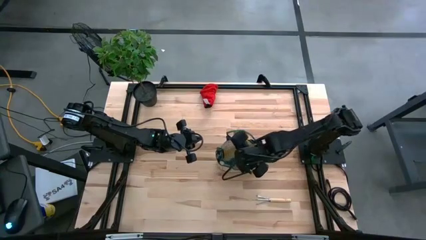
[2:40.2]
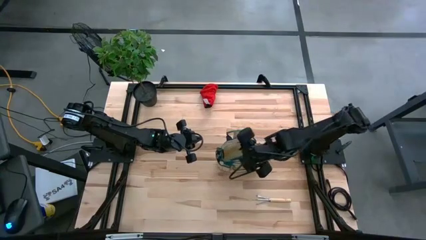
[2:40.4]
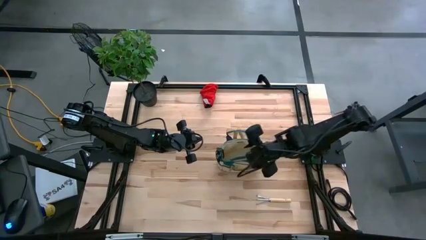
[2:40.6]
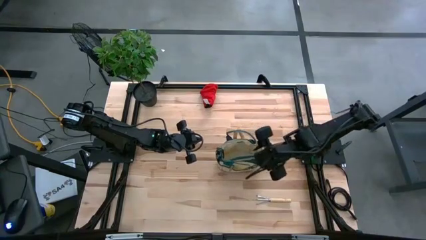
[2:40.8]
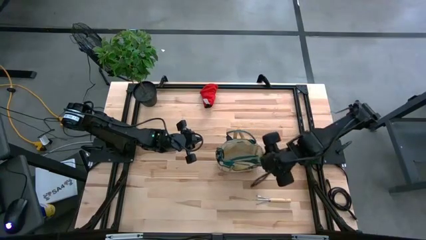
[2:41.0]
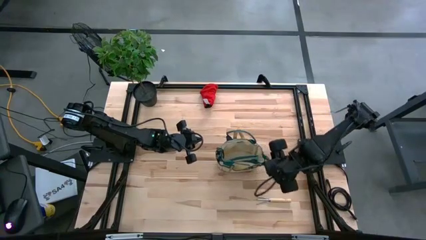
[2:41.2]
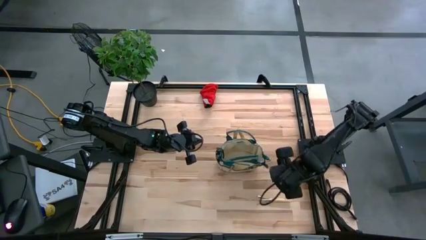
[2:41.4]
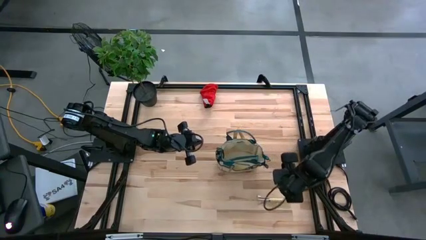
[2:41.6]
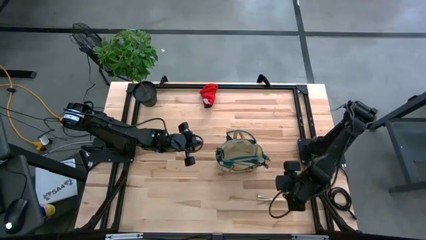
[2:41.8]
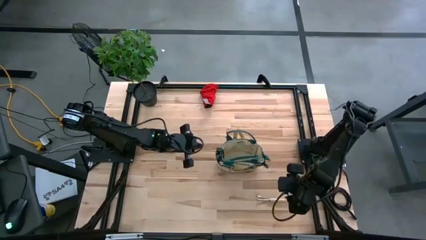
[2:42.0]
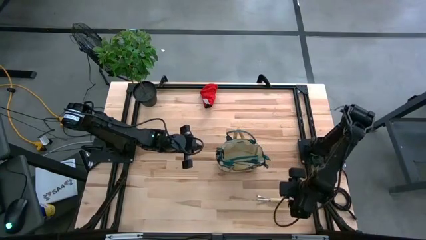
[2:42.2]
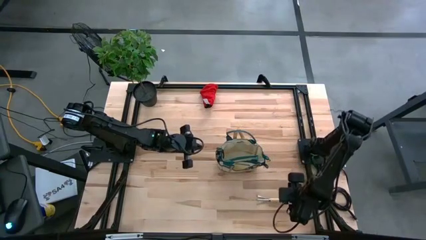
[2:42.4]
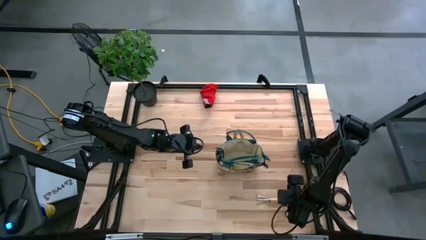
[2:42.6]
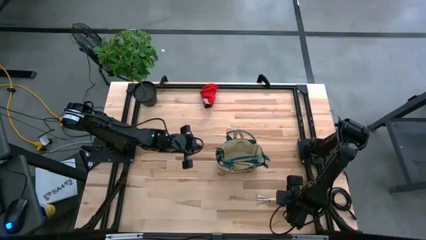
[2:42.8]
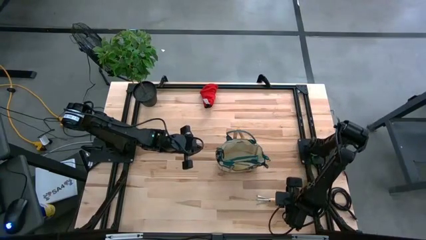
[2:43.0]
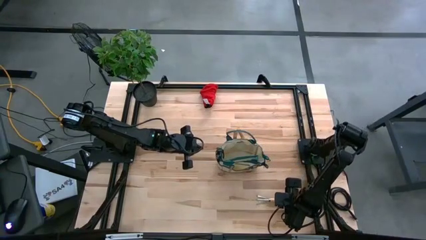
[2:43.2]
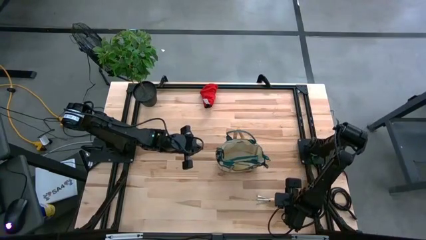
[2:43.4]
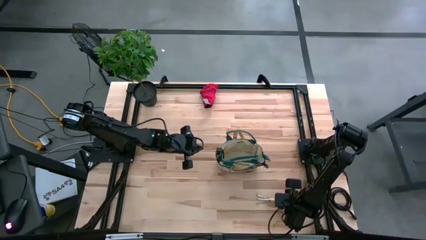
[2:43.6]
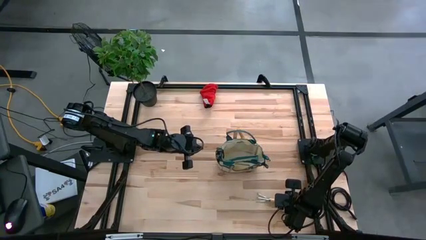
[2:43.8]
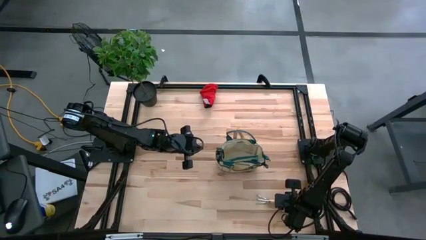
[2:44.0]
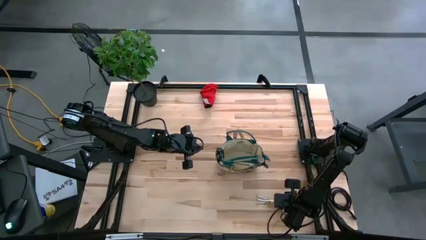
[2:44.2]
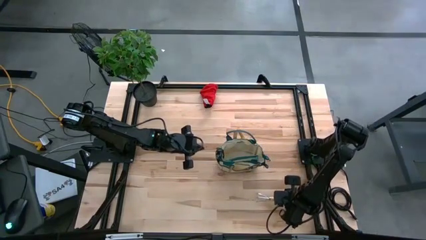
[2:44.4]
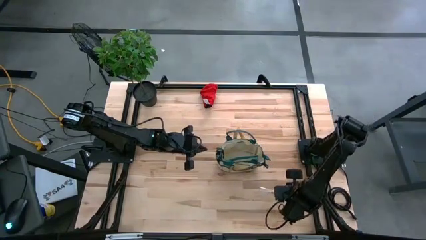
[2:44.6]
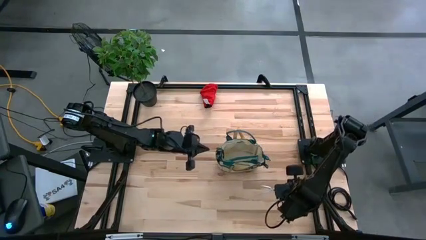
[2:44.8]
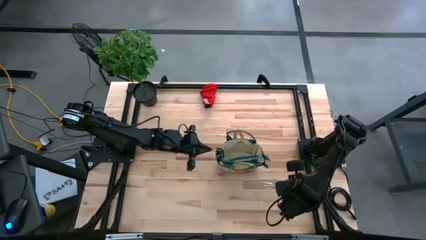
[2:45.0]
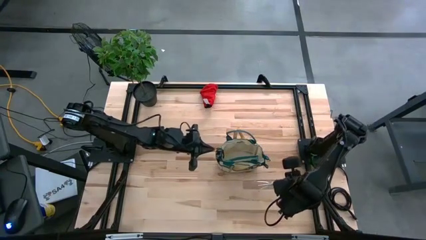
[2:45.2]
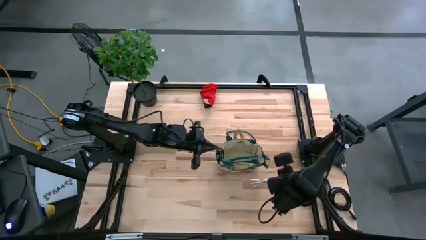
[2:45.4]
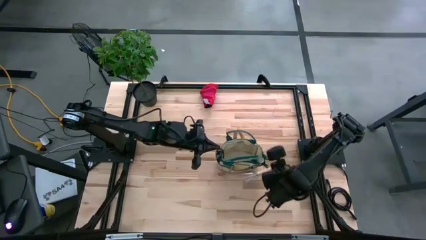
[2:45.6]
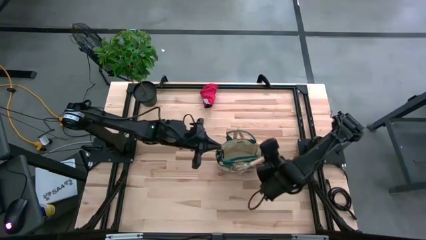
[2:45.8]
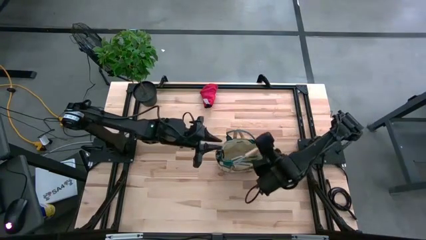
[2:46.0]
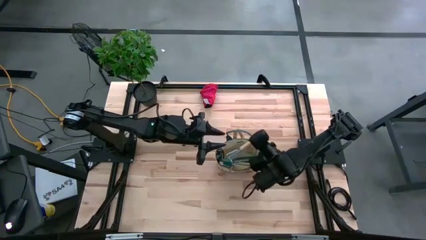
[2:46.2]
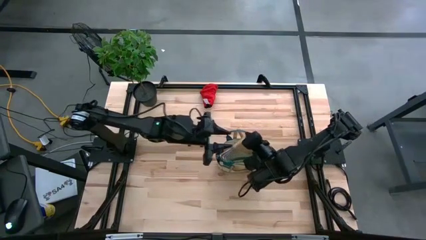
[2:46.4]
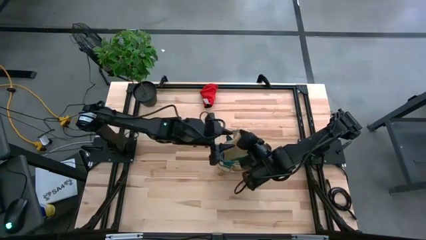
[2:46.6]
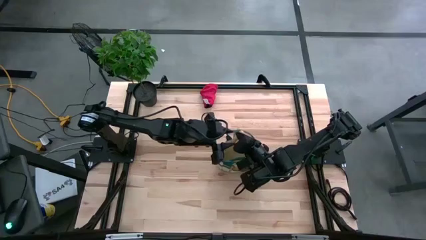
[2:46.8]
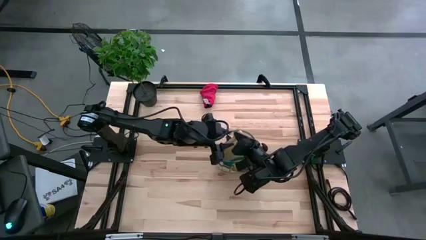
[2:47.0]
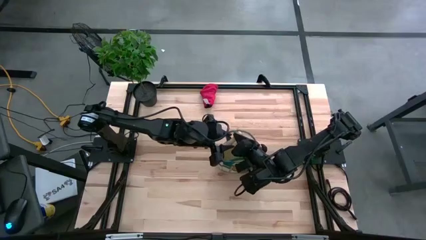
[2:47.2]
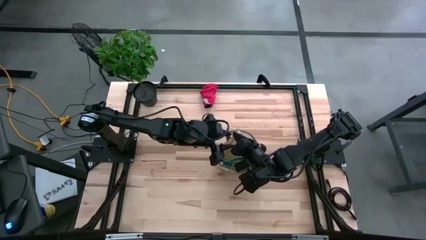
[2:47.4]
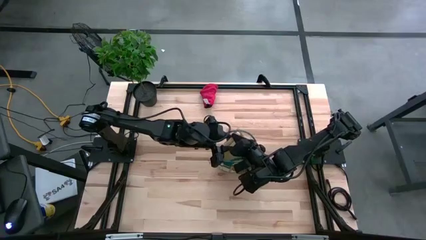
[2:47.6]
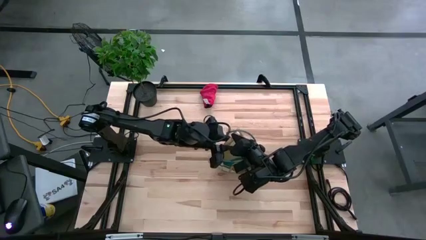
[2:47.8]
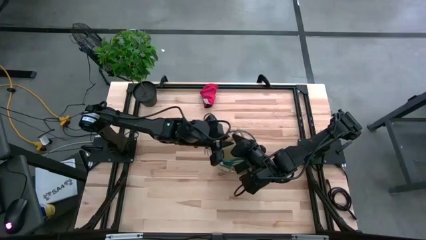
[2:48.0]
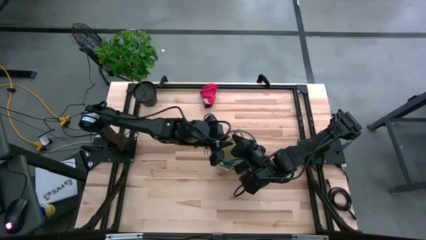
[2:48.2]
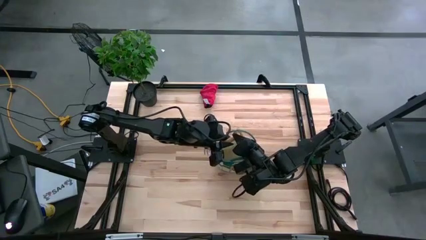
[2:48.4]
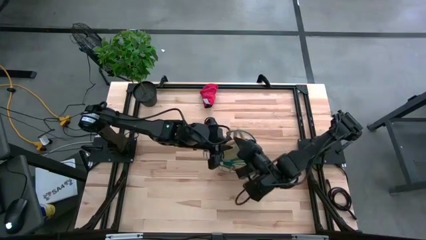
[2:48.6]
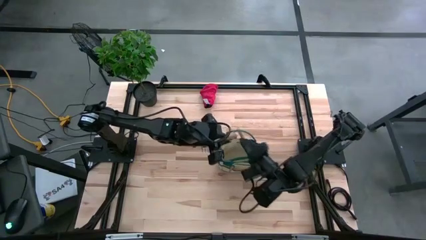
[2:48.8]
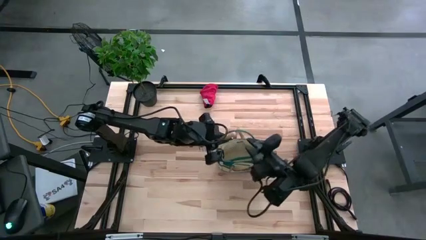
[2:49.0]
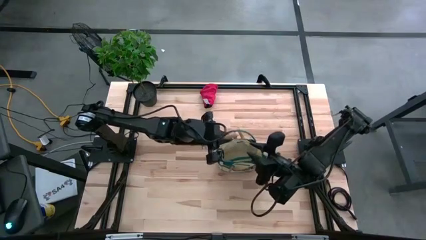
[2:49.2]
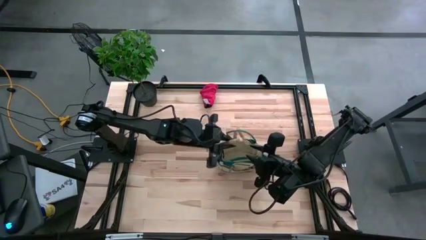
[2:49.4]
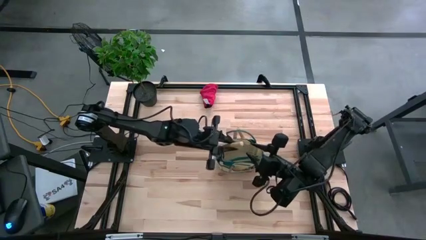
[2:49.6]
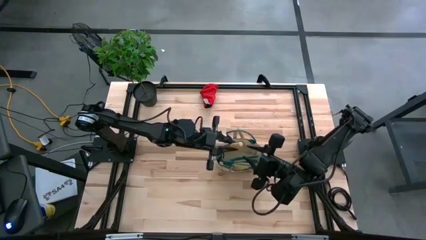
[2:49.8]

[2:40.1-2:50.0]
Task: Pick & Place Garden tools in Gardening bag
Put the hand rake into the gardening bag

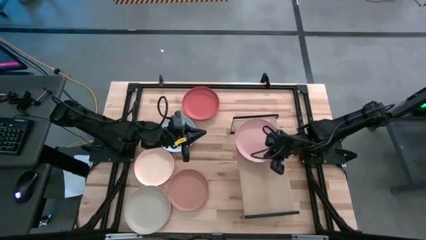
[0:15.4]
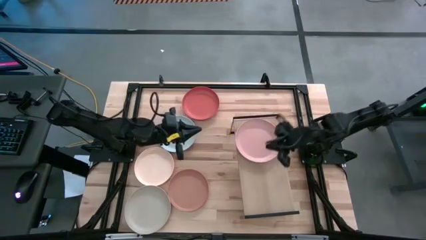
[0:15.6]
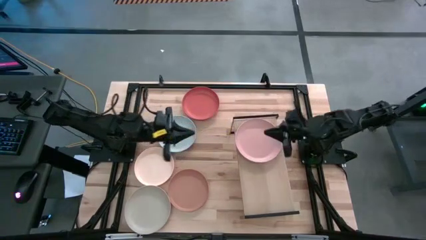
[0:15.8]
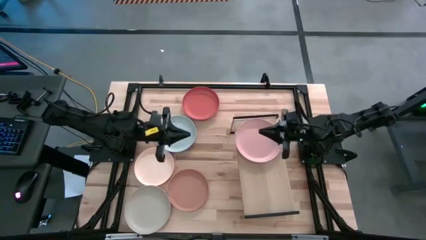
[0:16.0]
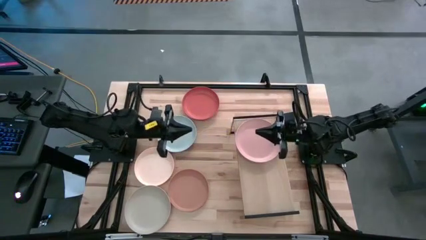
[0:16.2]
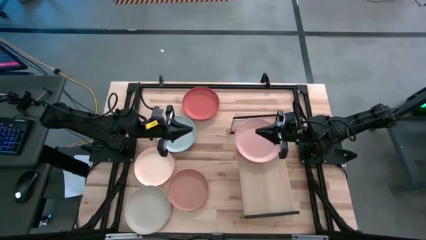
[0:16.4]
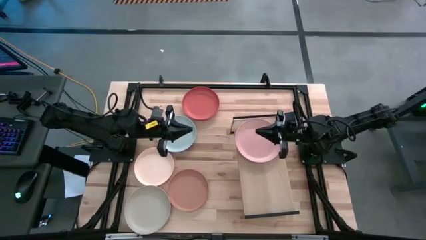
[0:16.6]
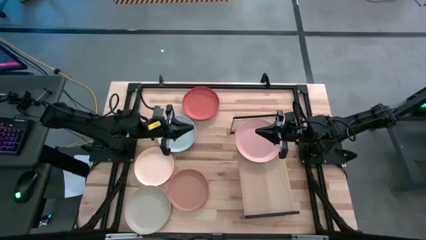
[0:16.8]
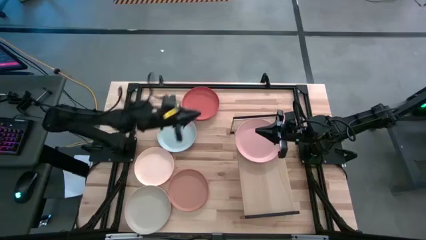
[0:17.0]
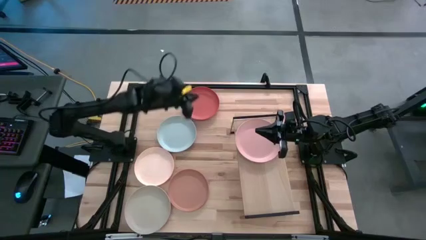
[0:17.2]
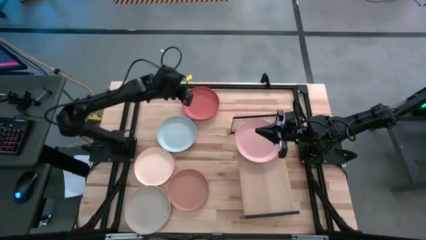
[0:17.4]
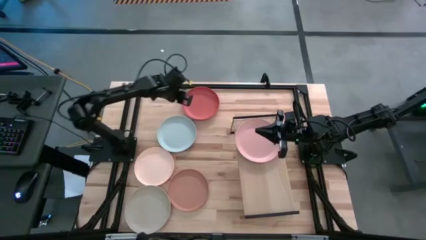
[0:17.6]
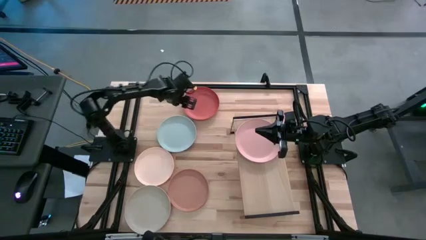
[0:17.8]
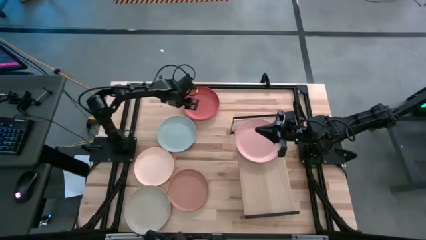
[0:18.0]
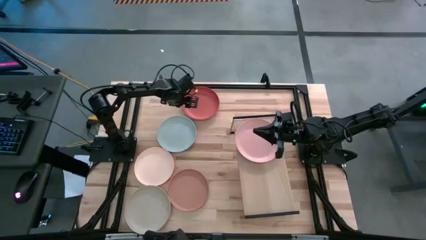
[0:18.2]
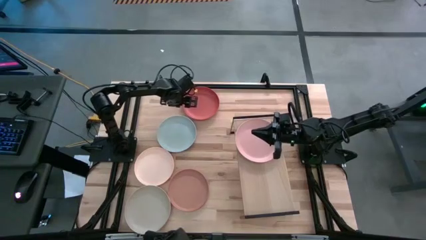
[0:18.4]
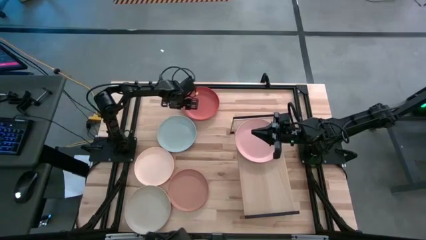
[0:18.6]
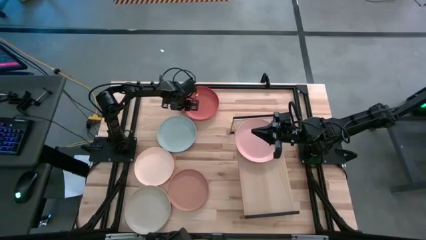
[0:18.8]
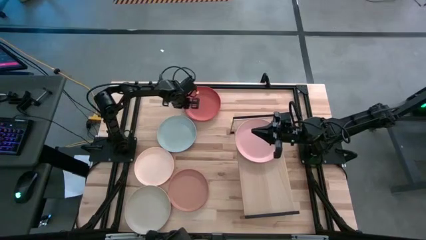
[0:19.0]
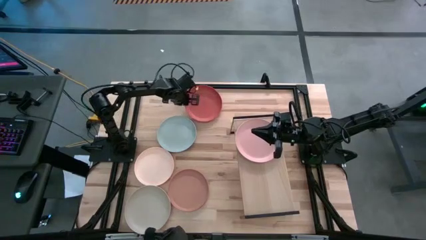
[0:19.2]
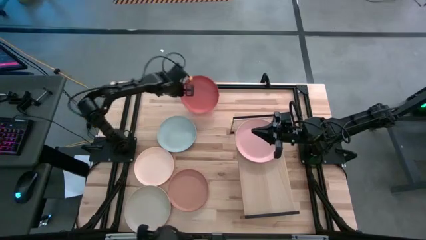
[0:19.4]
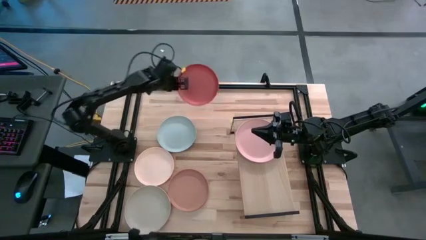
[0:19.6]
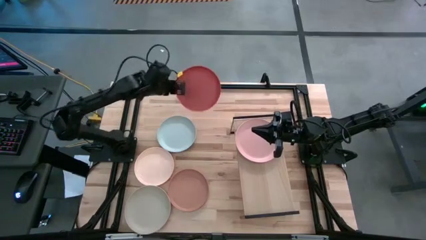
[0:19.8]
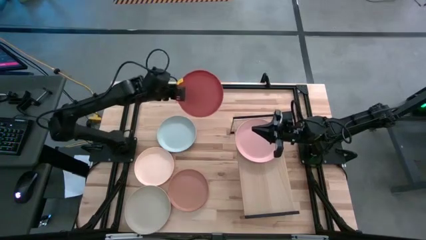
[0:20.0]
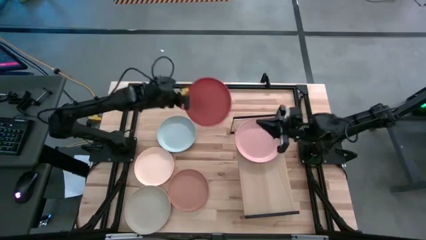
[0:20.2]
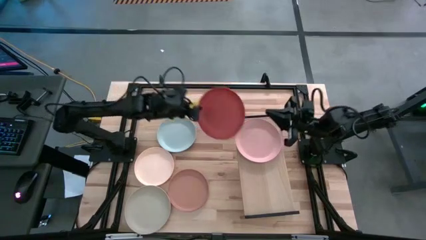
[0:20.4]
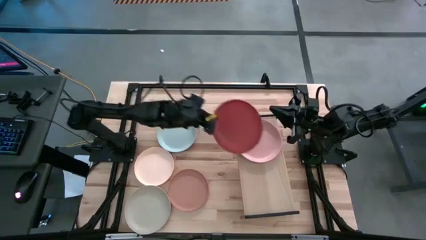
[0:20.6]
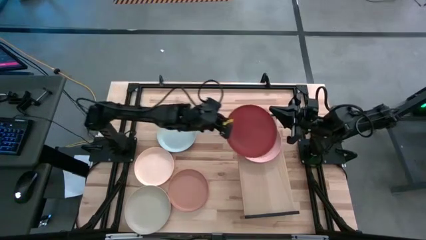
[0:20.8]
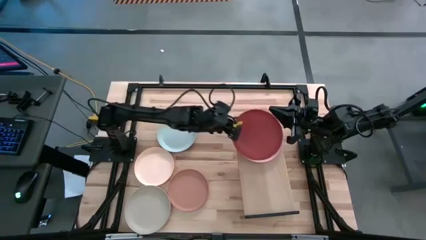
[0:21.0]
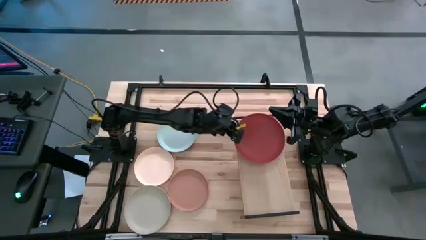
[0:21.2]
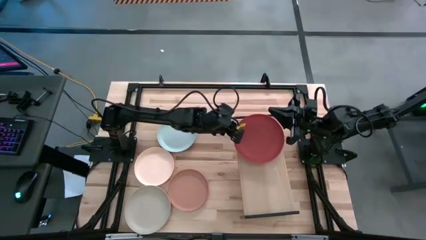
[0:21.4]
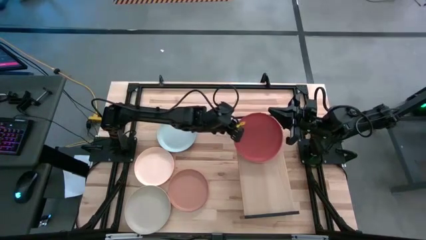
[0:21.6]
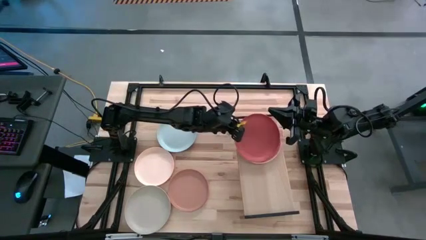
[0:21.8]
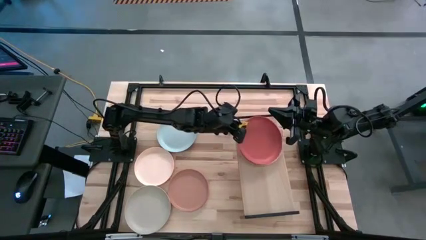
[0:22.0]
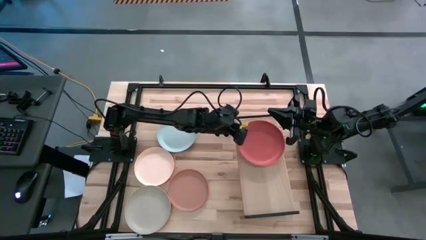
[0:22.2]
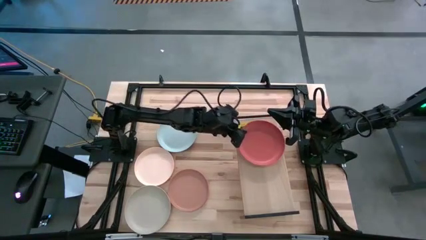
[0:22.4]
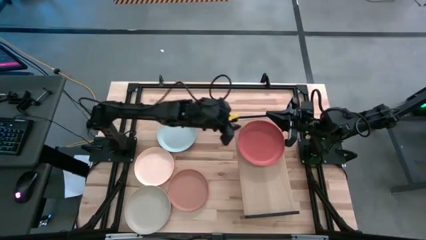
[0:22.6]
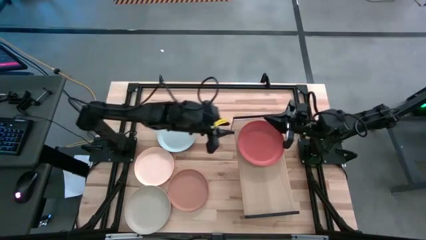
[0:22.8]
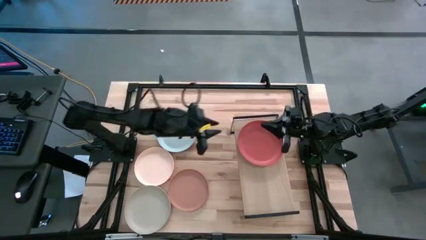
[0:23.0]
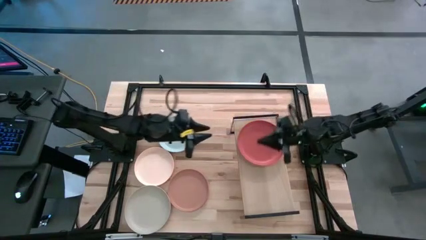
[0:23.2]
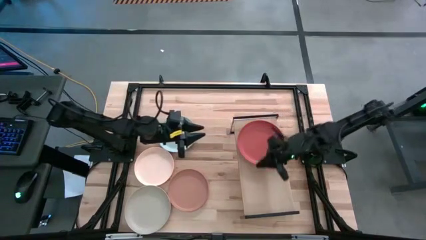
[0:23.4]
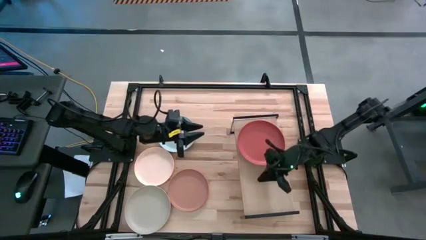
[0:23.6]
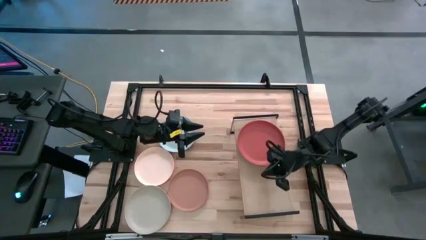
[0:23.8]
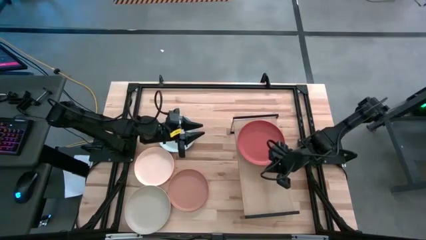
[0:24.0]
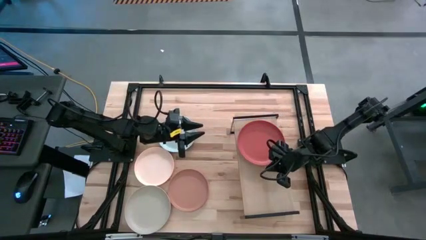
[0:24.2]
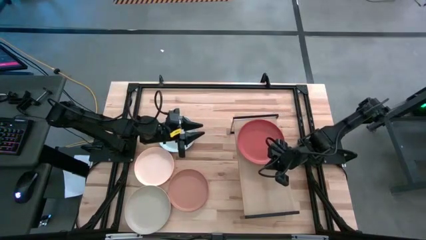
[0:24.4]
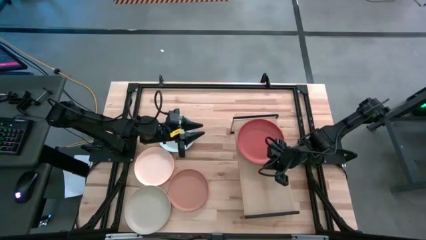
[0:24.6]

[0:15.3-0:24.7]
Task: Place and stack plates onto a shelf
Stack the orange plate on top of the pink plate on the shelf
